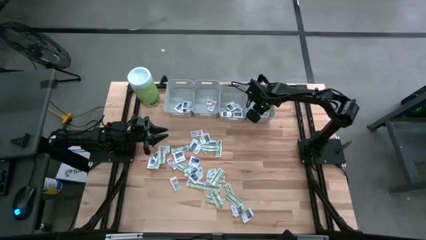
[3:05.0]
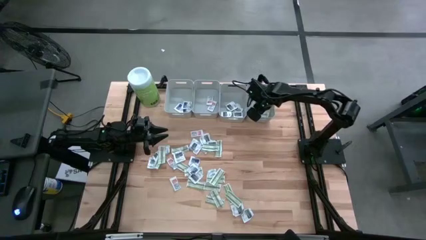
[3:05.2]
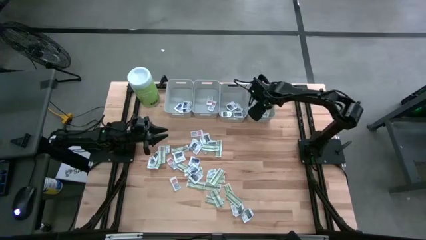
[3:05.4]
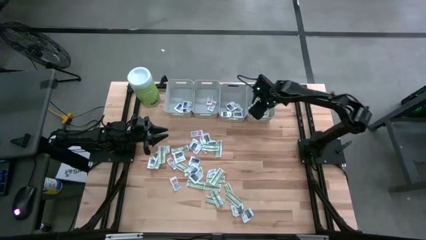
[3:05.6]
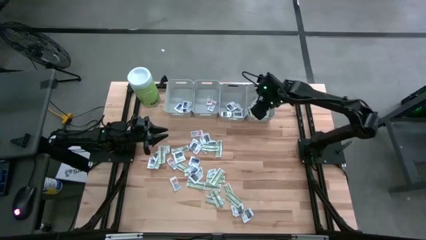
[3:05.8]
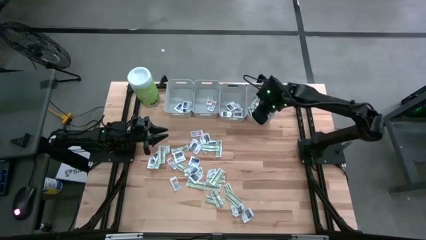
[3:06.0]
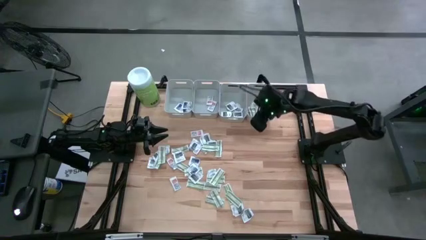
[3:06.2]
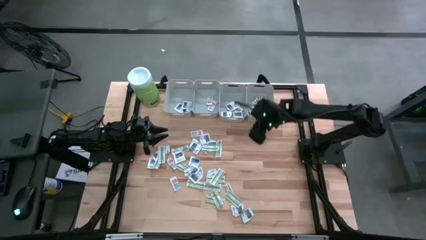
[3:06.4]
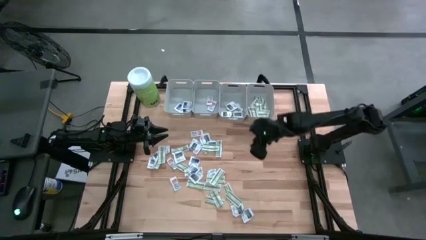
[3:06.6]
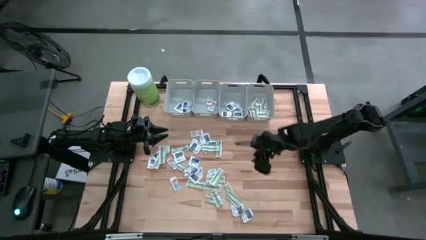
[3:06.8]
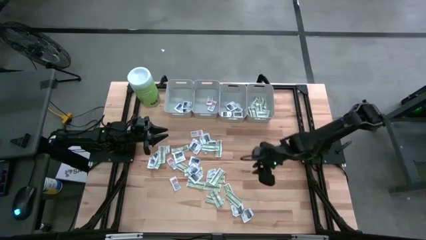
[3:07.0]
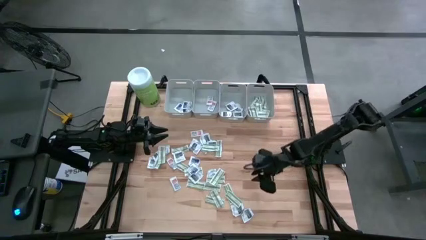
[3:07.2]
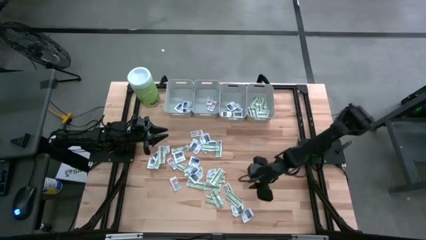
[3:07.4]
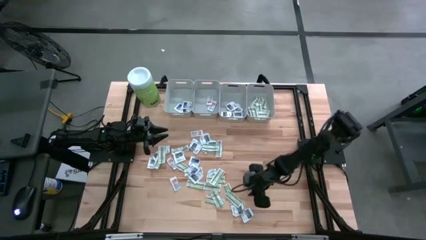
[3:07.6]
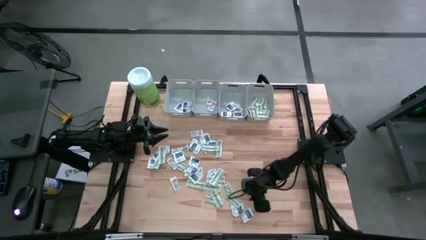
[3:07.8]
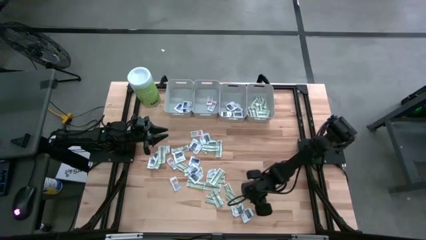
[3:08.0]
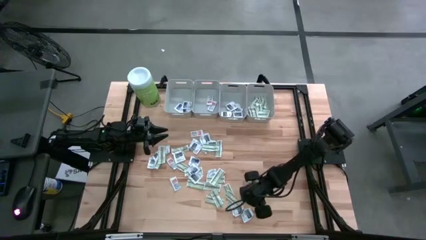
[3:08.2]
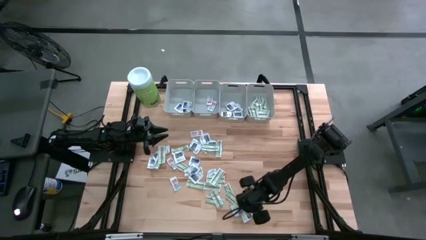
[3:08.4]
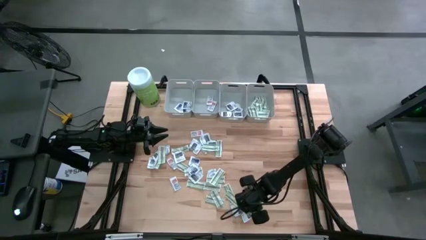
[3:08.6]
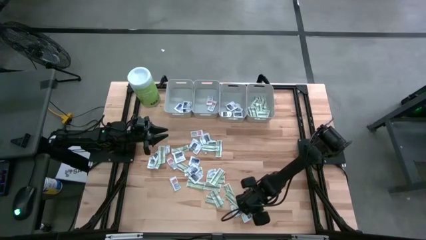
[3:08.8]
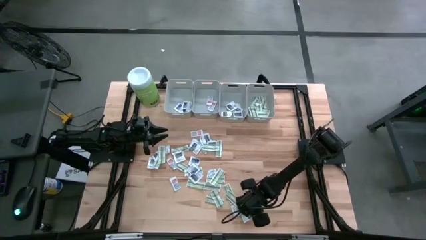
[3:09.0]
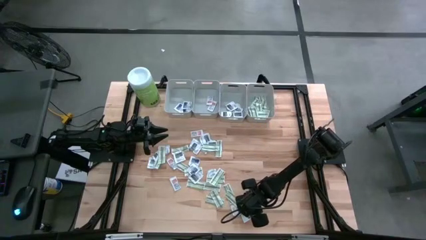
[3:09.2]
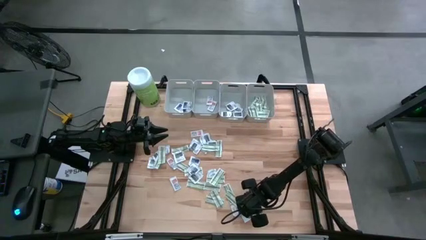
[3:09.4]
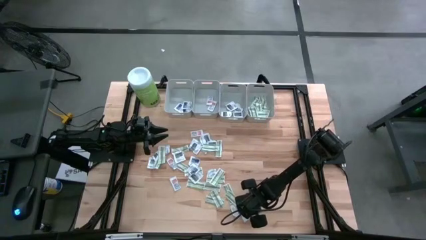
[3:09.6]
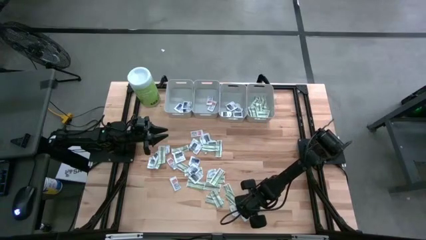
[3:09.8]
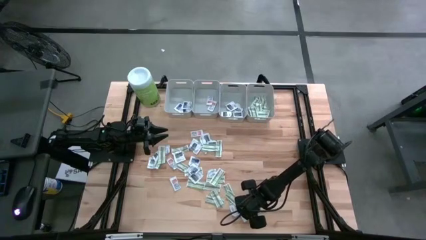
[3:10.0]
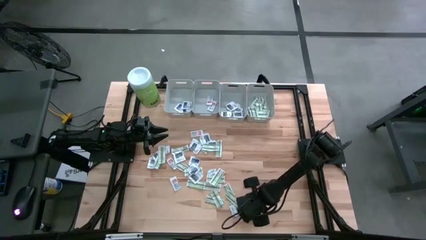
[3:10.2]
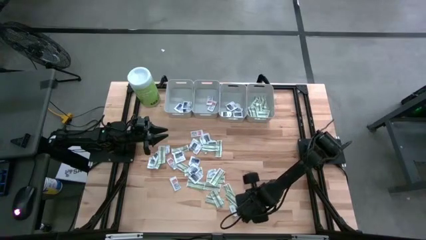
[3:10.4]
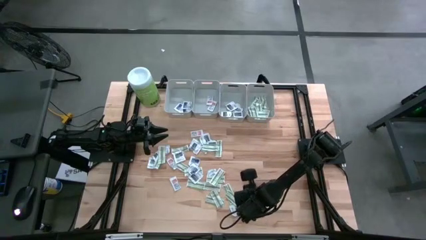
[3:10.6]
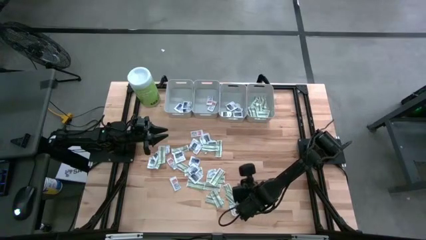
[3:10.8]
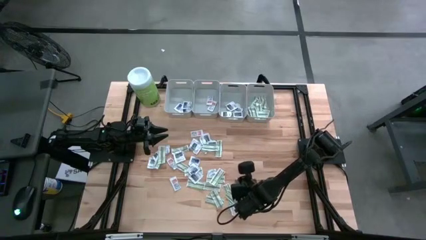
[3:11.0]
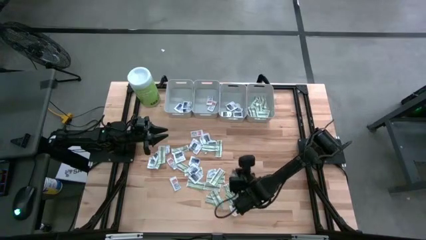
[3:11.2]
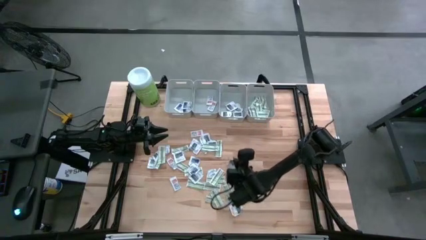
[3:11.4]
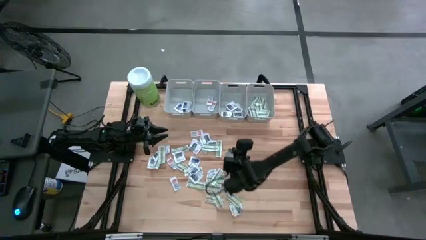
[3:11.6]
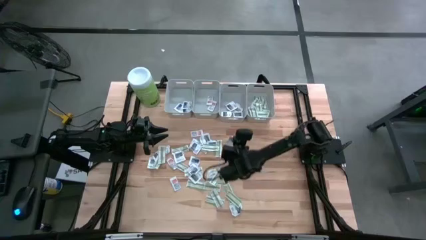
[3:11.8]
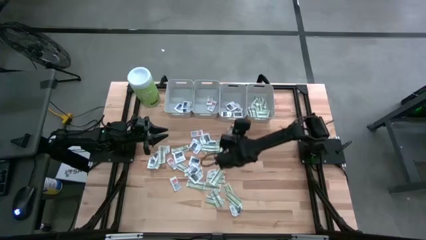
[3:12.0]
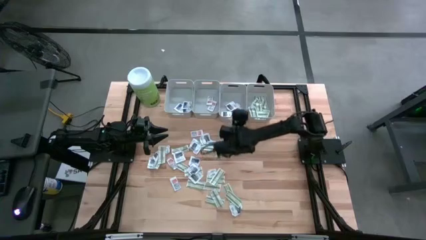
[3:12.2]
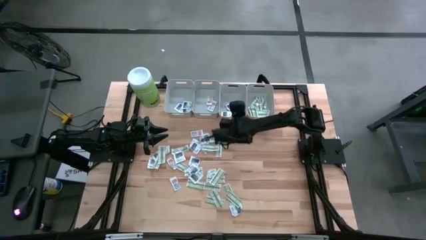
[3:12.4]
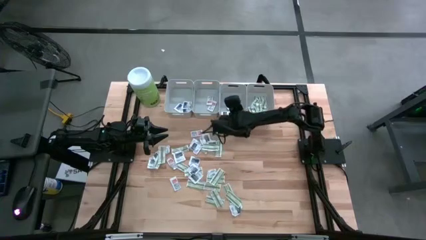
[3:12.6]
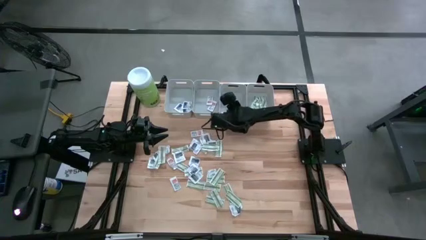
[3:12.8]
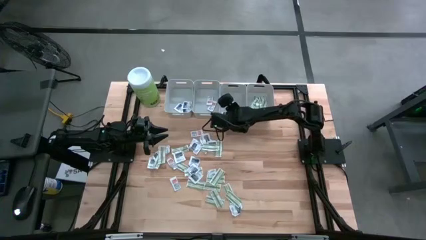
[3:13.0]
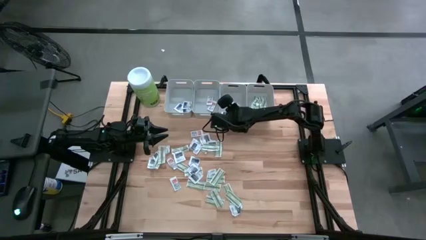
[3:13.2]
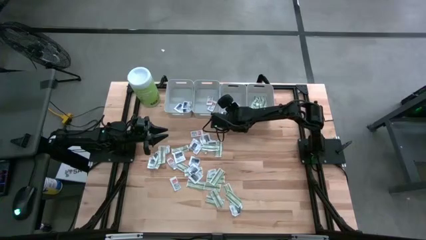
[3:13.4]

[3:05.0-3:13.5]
Task: Pick & Place First Aid Supplies
Put the towelette pack into the middle right gray bin

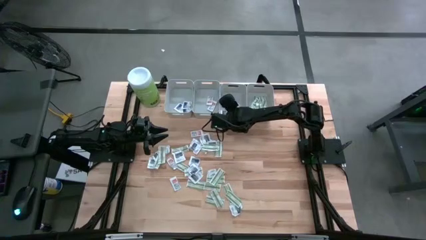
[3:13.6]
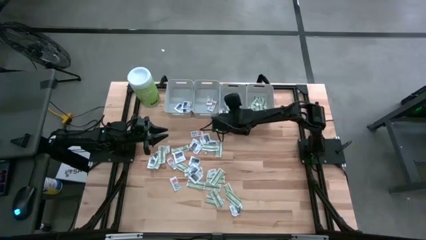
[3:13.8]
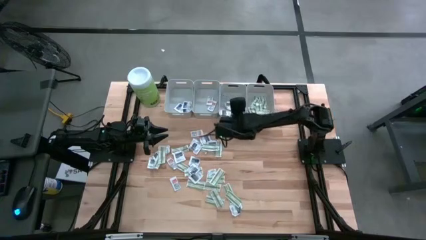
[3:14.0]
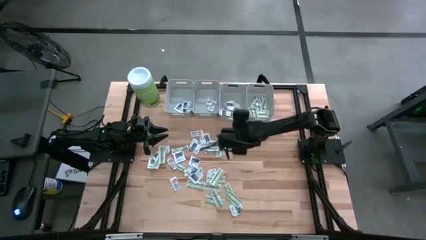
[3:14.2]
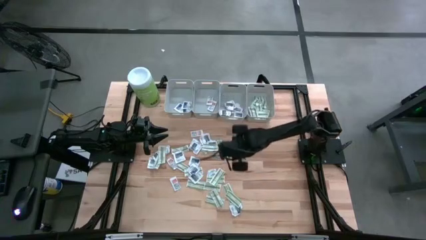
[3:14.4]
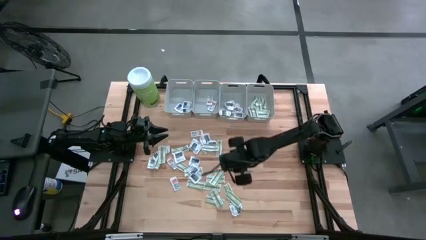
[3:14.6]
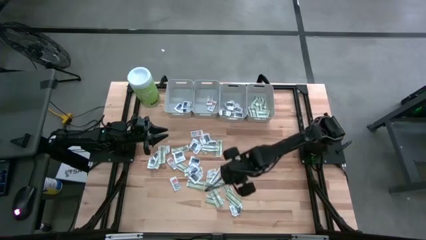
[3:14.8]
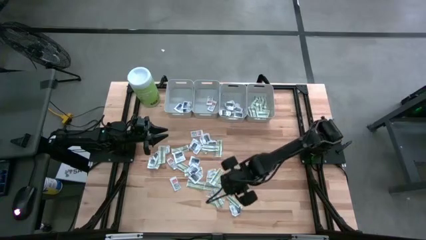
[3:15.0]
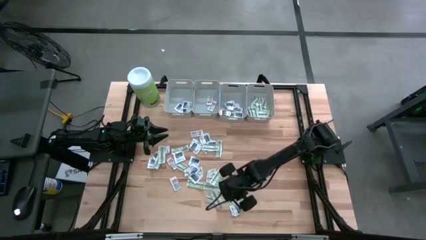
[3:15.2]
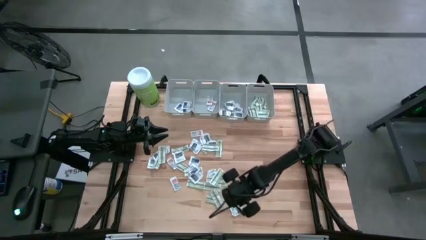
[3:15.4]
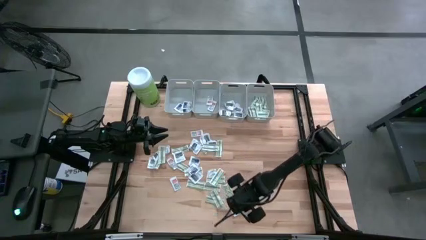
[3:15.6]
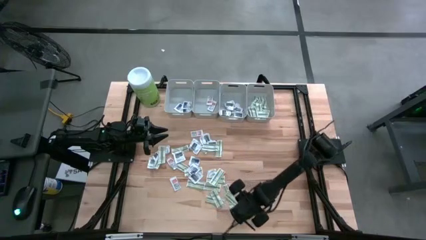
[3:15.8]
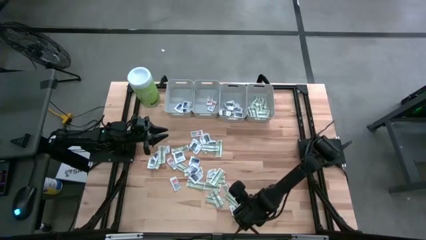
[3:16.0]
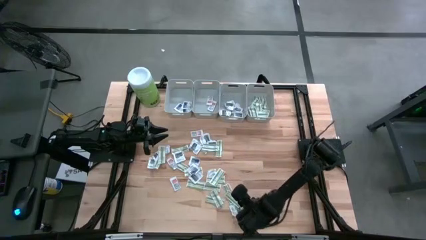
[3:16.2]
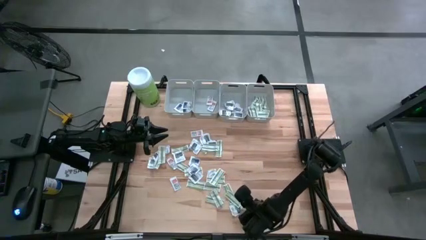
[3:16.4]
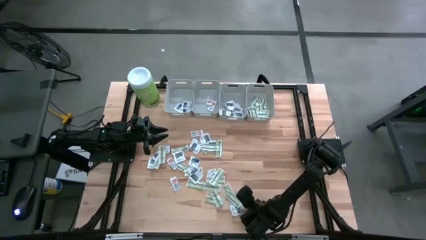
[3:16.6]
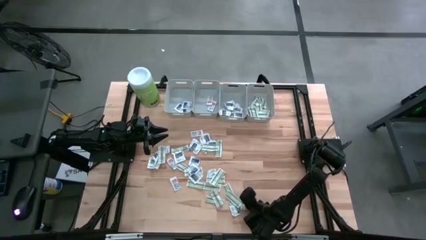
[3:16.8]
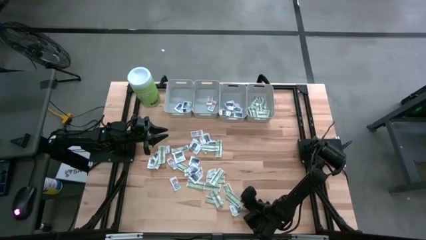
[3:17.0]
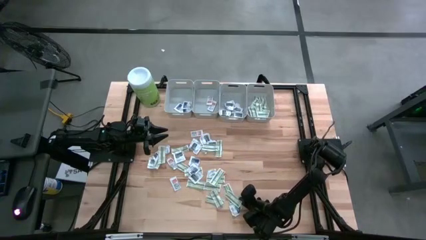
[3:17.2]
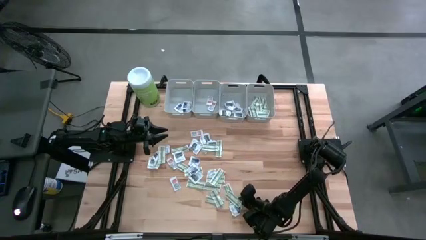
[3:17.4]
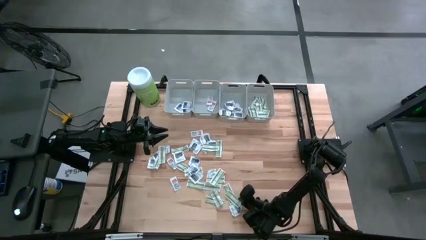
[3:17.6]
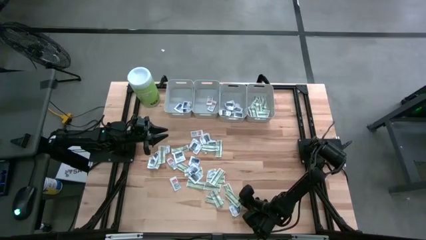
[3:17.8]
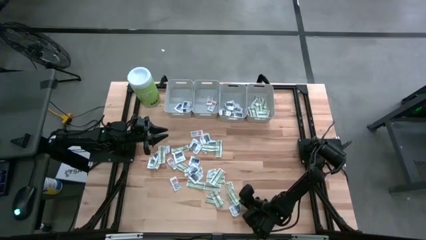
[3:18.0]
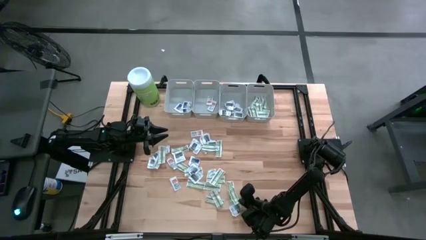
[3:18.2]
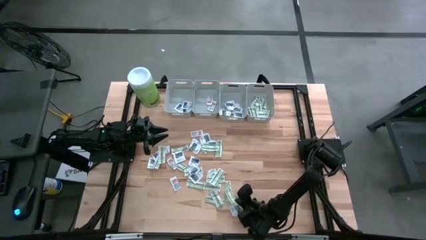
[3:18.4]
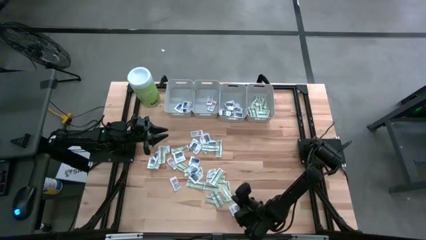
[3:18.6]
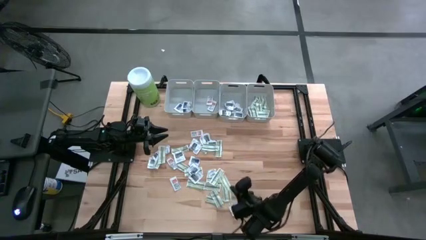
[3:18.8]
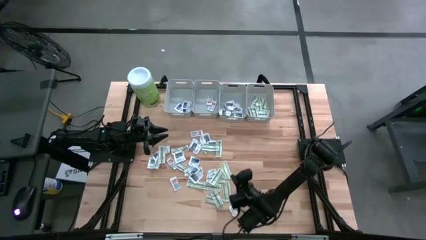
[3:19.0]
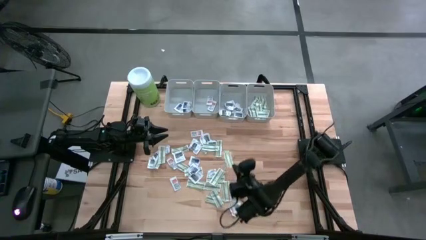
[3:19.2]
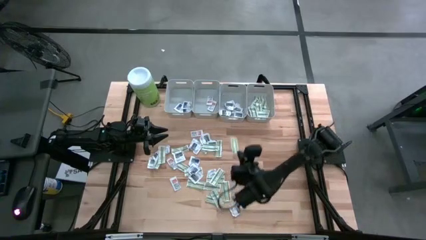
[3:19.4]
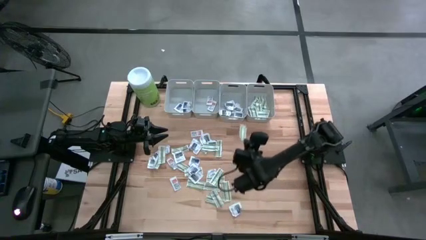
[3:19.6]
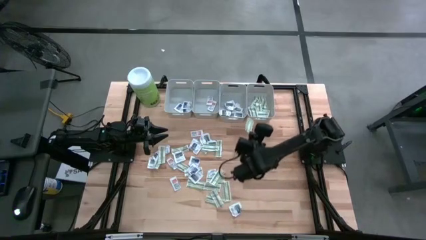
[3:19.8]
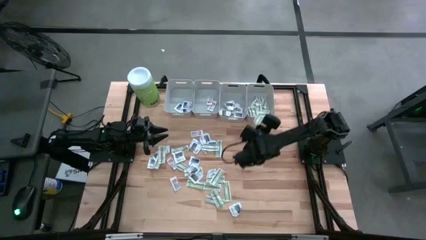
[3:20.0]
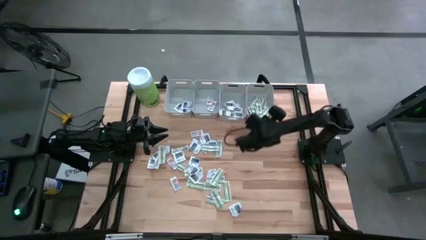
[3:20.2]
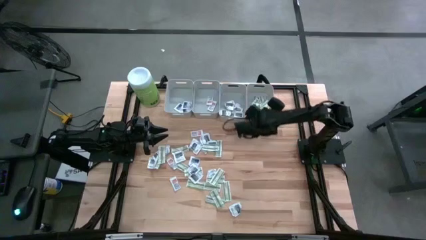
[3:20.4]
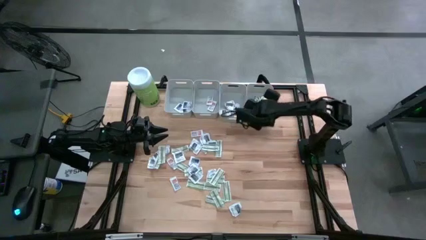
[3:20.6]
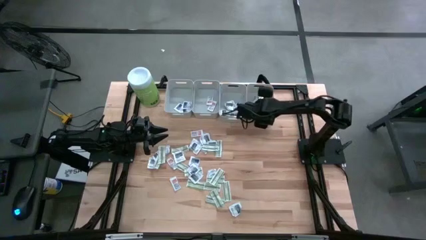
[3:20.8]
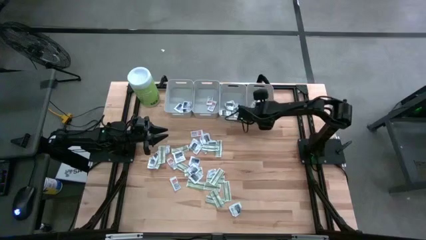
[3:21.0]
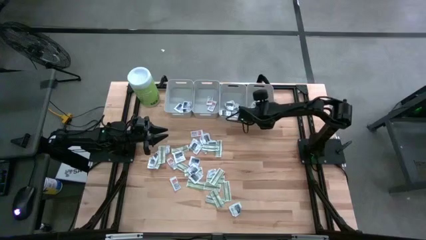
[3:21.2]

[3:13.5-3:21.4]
Put the bandage into the right gray bin
